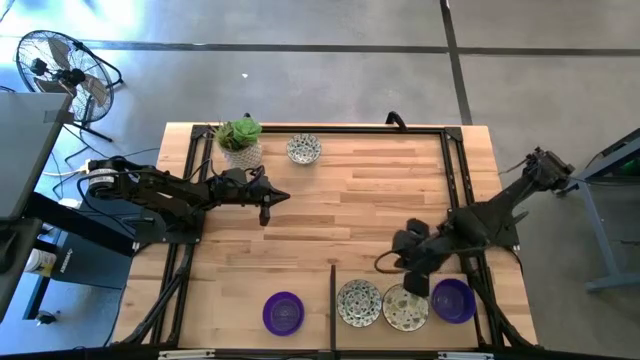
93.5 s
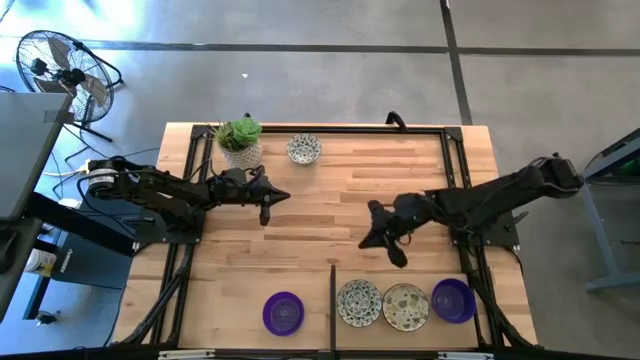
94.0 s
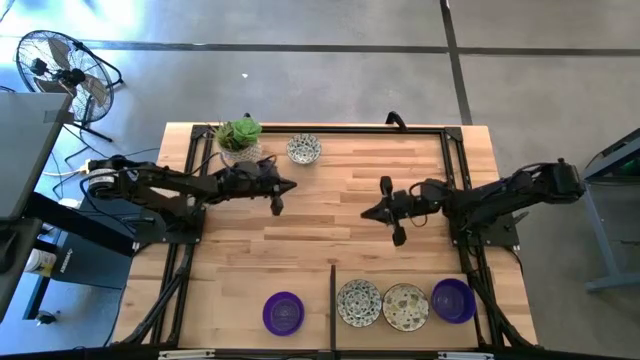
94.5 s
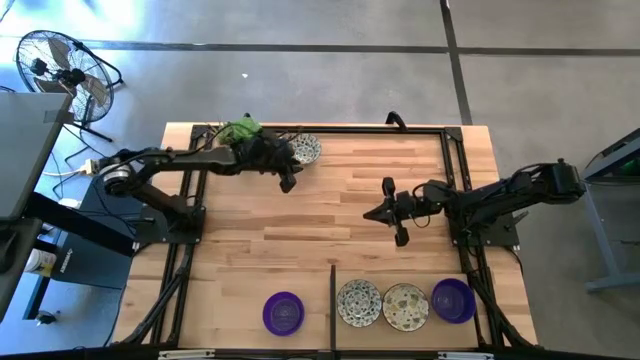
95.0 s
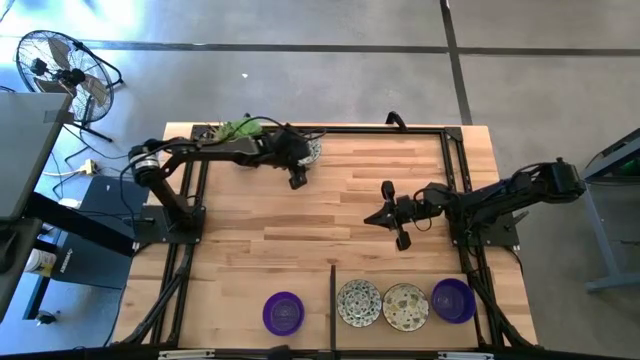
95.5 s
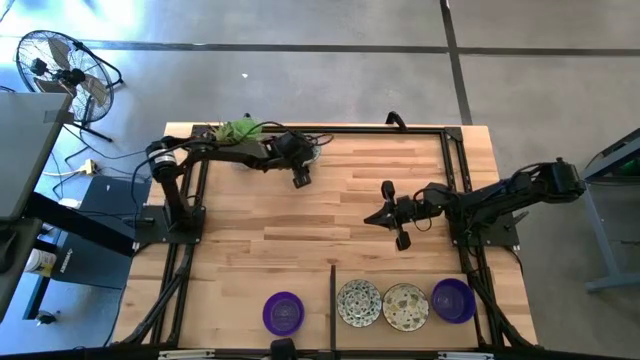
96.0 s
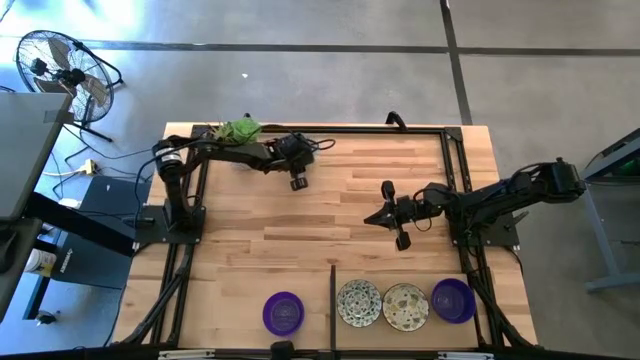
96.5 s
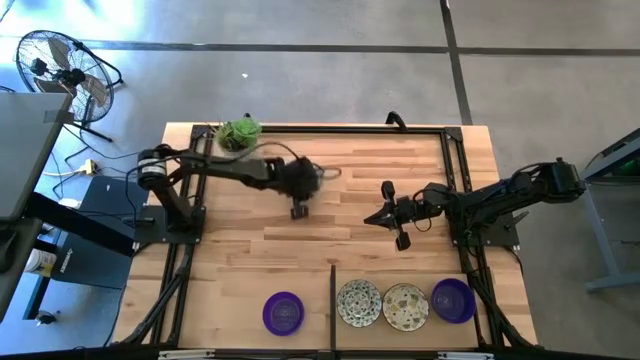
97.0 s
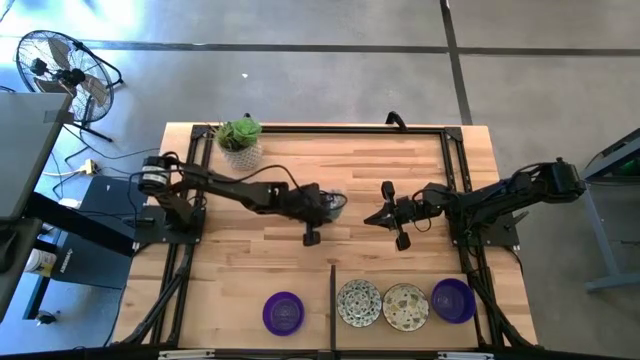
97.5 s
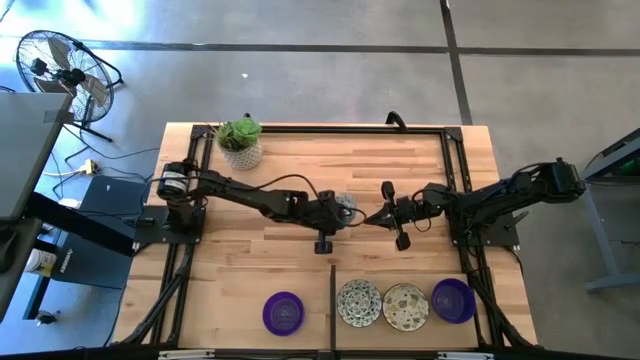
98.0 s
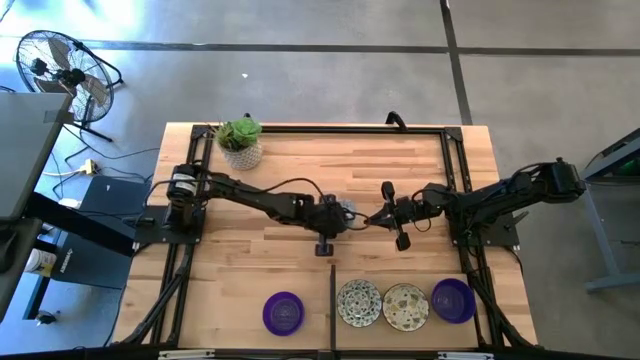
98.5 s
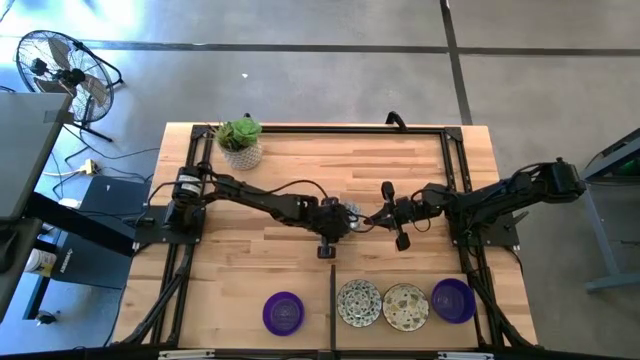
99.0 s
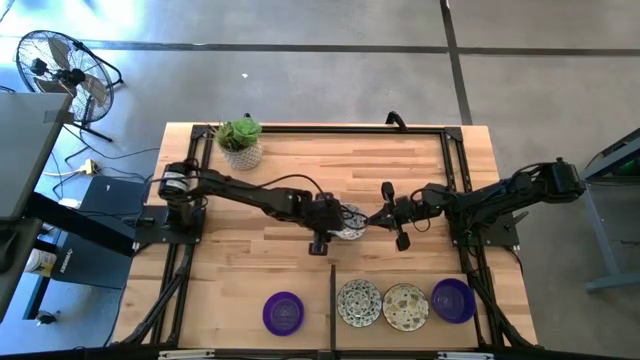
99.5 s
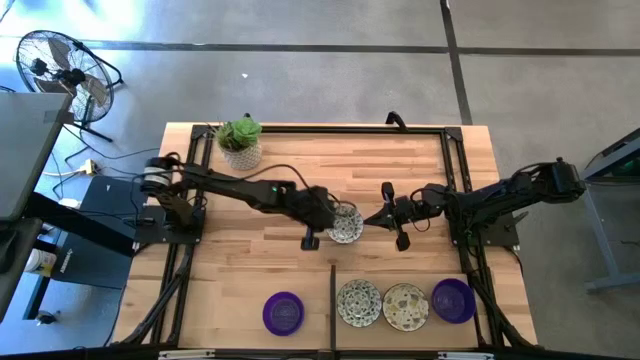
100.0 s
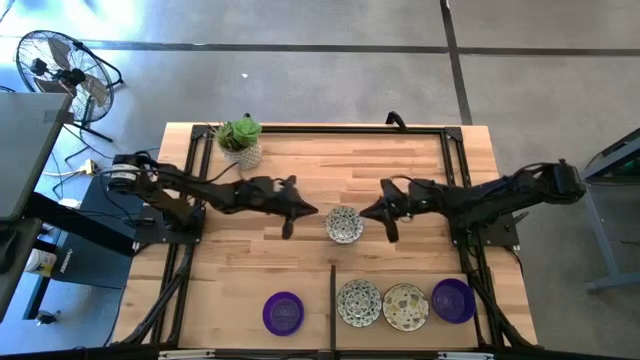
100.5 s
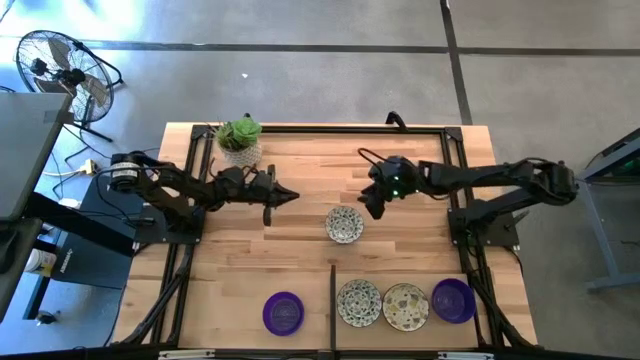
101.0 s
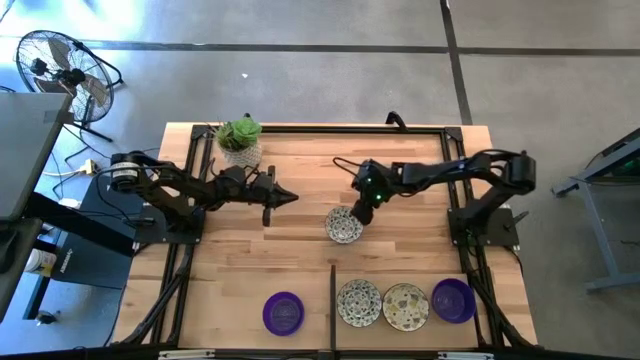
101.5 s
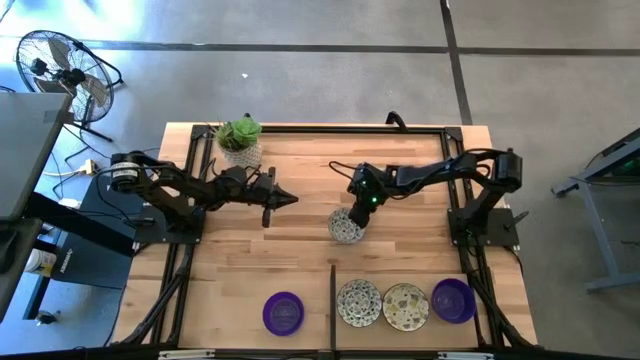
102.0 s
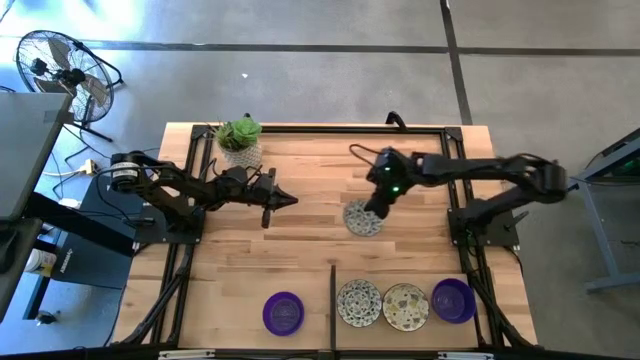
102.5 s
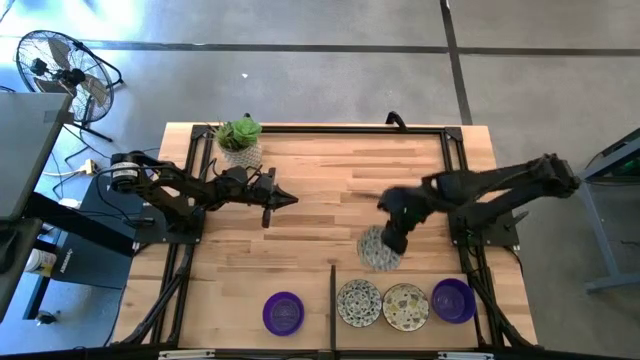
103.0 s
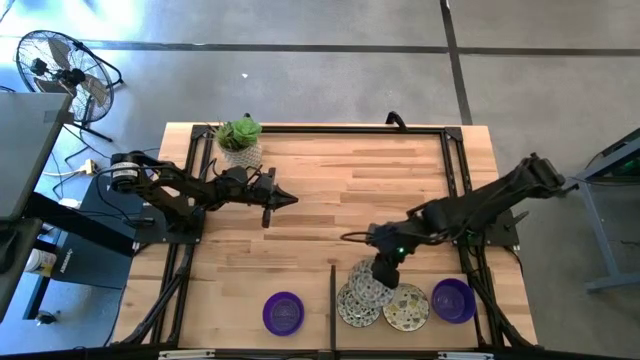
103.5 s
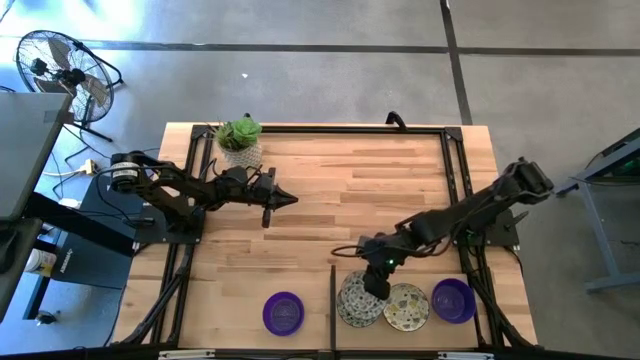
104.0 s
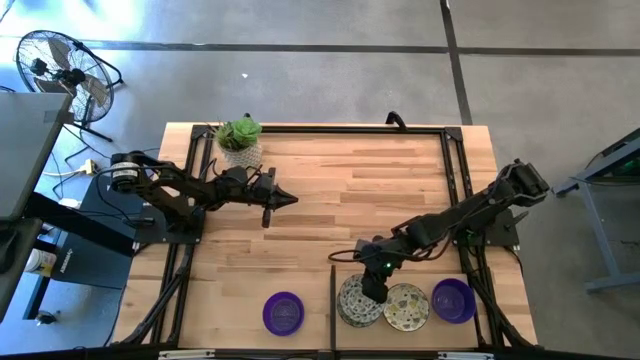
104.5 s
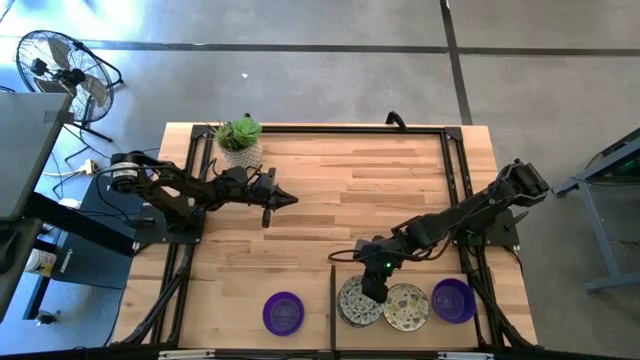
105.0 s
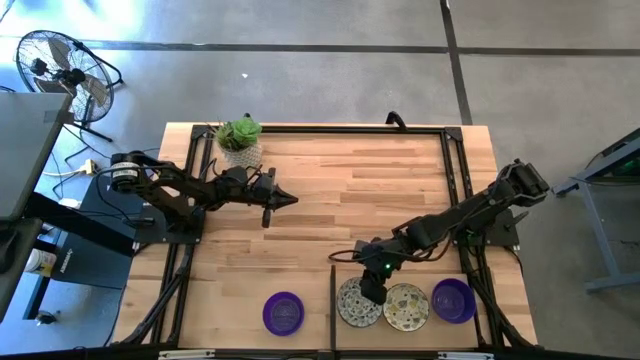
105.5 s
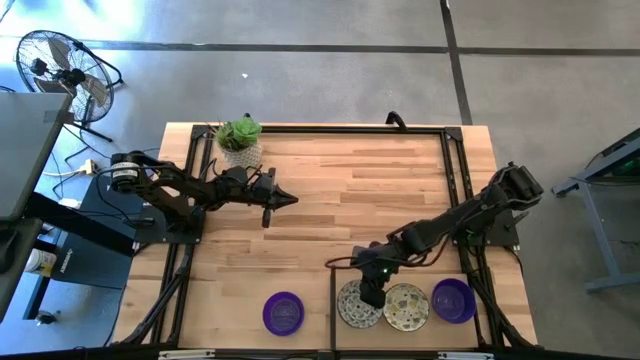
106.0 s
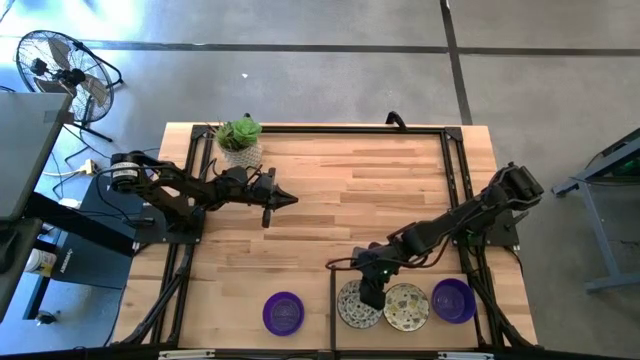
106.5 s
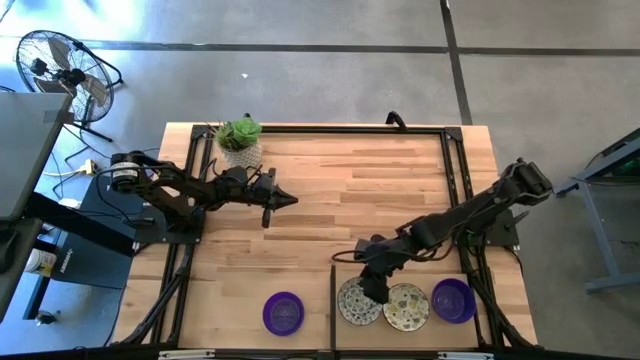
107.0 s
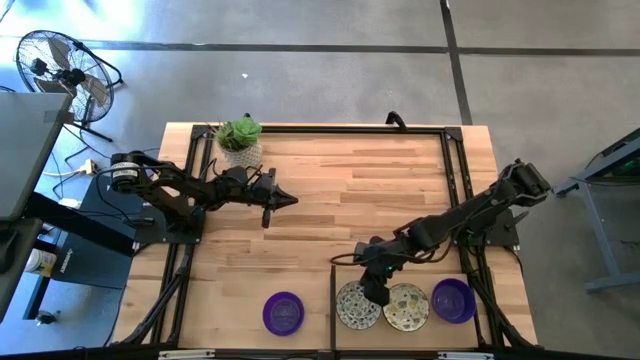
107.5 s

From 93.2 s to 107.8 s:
Task: Pick & Place Mini bowls
Stack the blue patterned bowl on the blue patterned bowls on the shelf

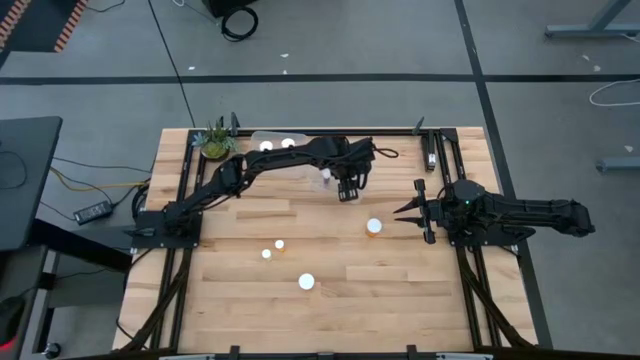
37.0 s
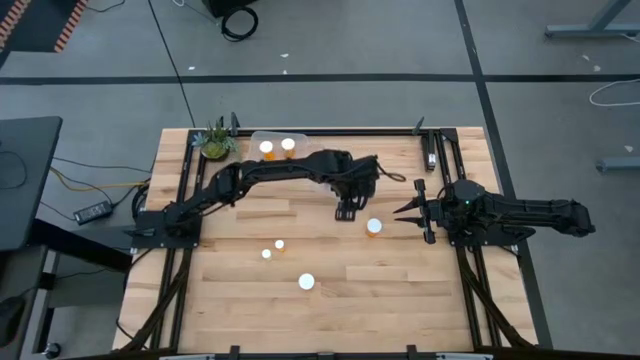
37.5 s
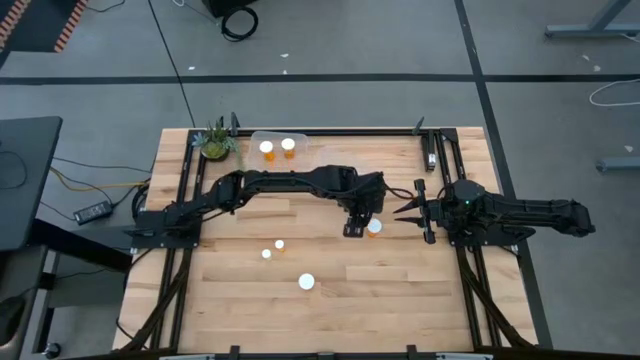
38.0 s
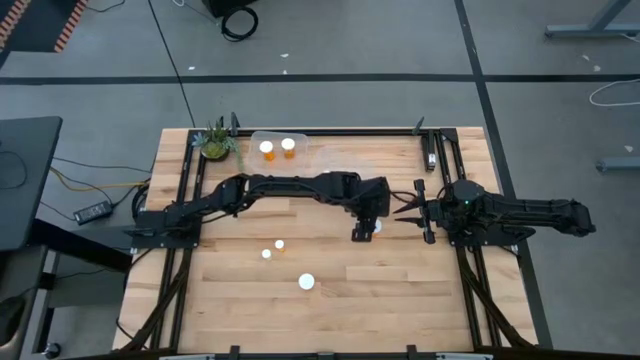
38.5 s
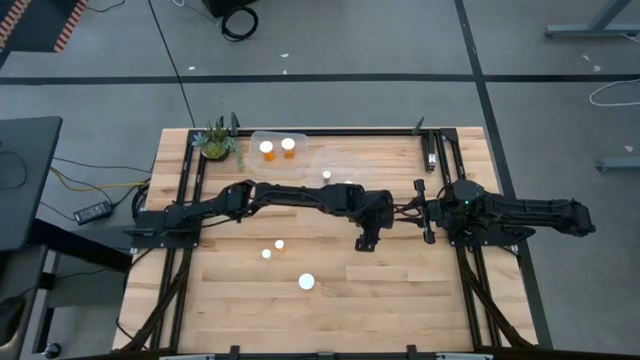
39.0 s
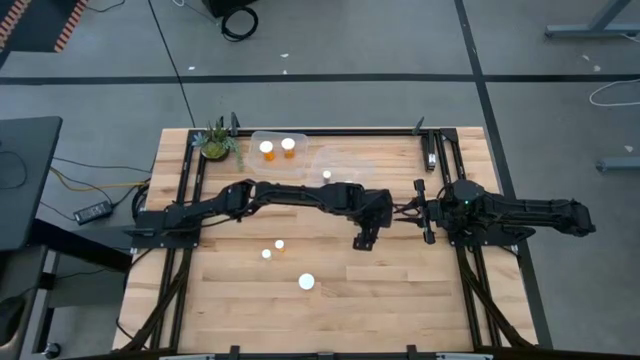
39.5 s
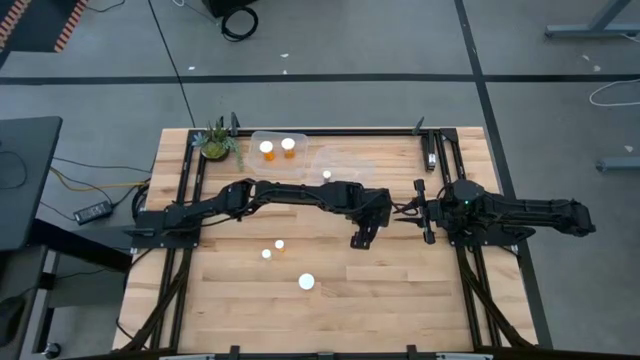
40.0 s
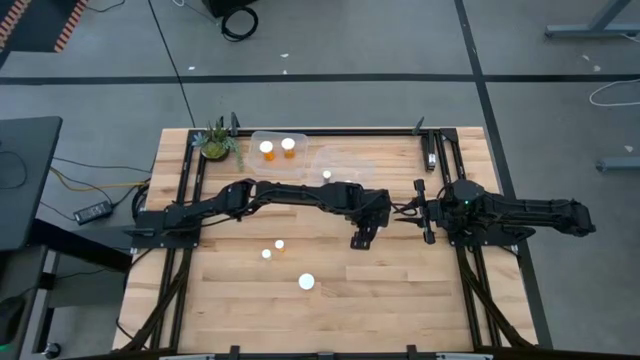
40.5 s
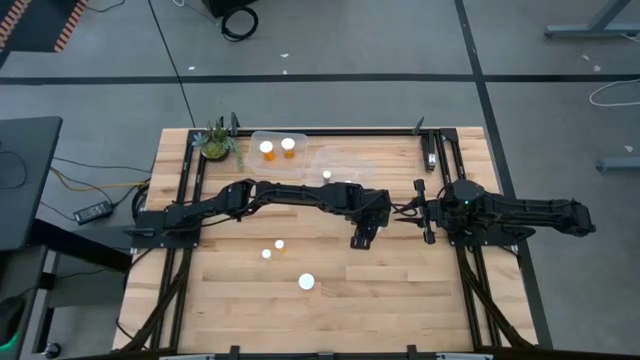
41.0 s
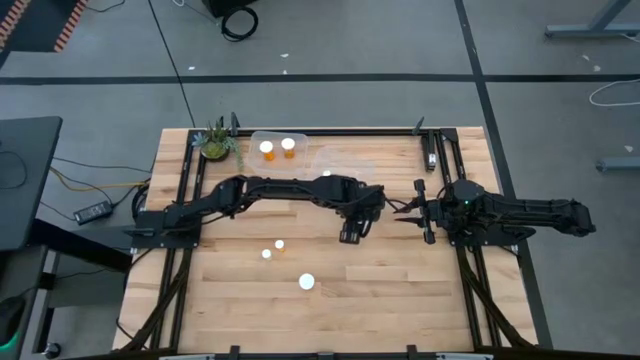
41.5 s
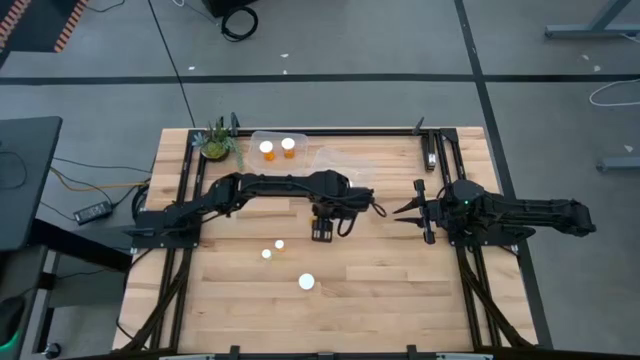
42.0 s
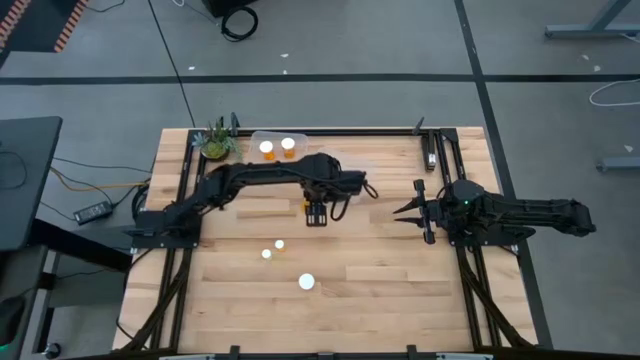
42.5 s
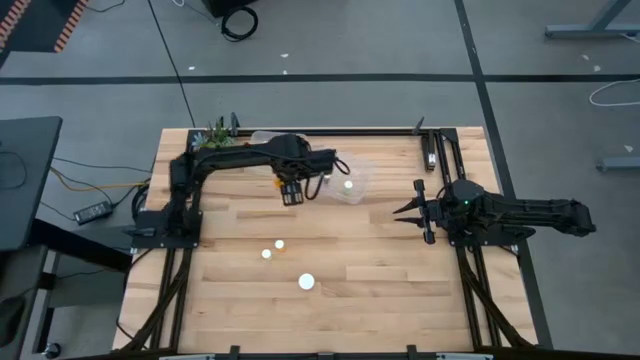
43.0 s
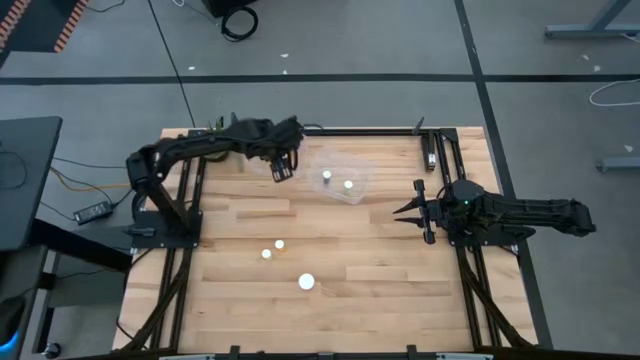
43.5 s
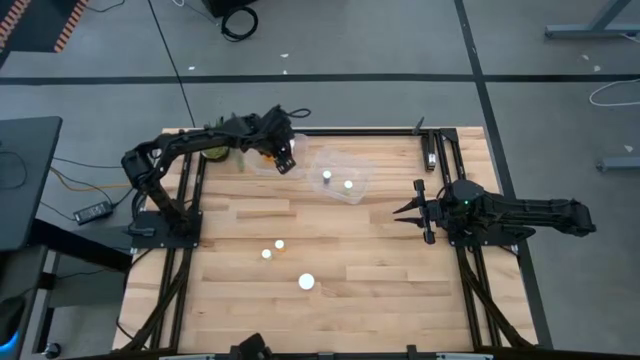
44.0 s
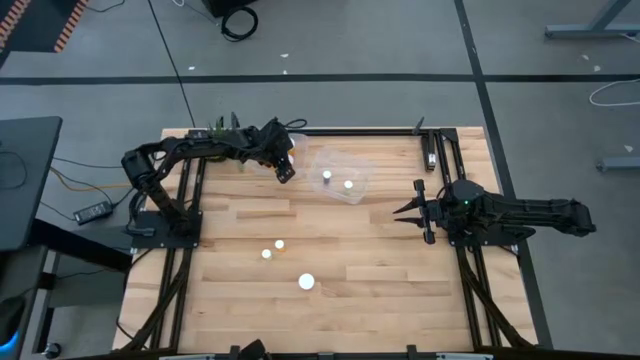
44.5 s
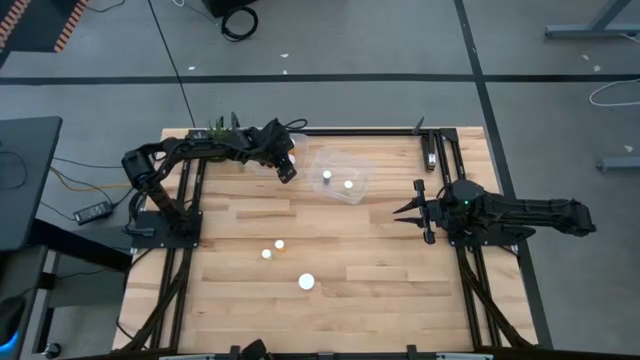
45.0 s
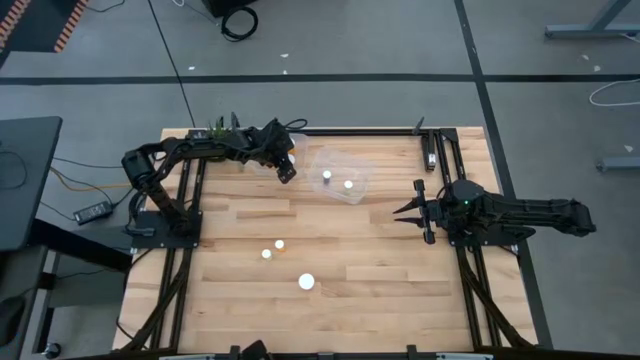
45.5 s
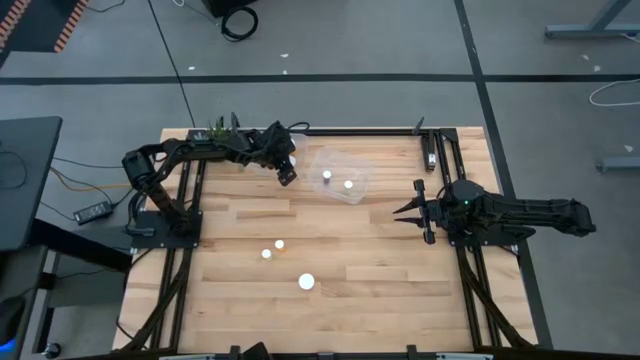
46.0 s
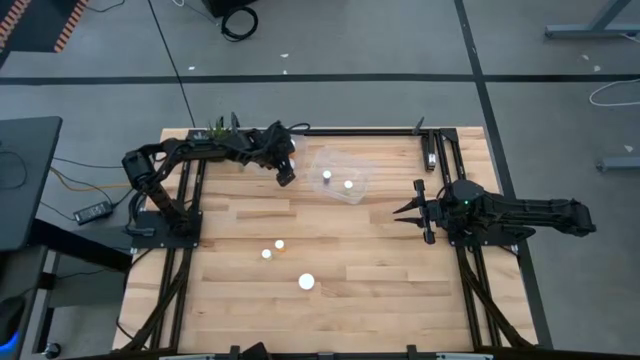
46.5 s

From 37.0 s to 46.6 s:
Task: Pick and place medicine bottles into bin by pill shape (circle, oval)
Put the top big orange pill bottle into the left transparent bin
